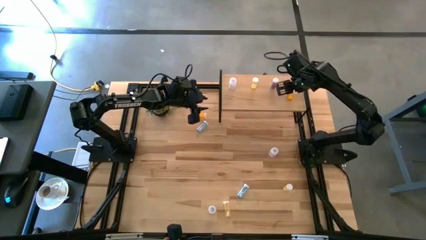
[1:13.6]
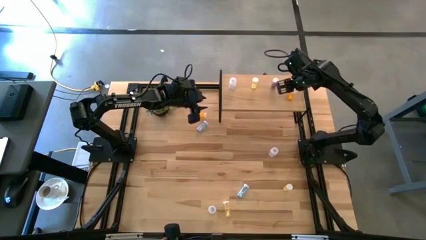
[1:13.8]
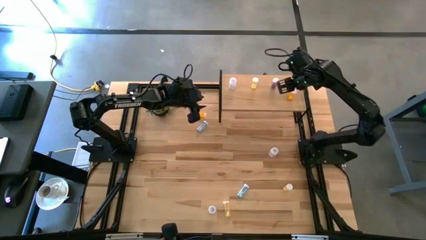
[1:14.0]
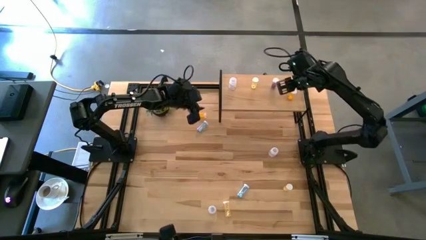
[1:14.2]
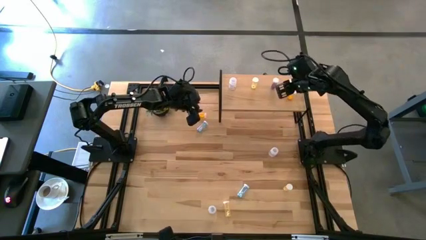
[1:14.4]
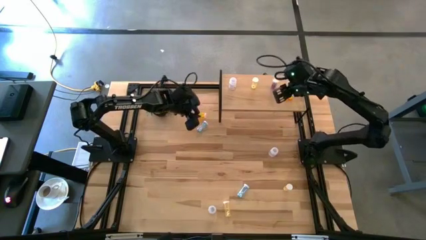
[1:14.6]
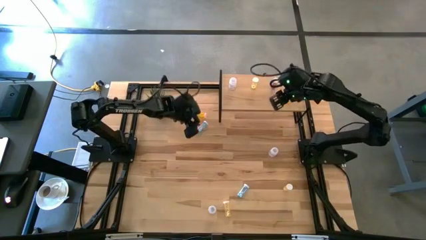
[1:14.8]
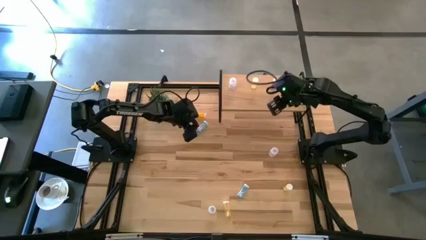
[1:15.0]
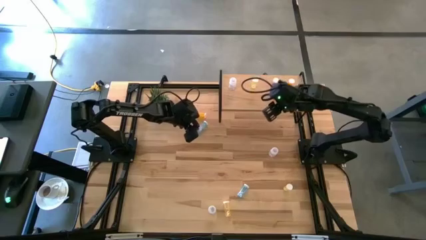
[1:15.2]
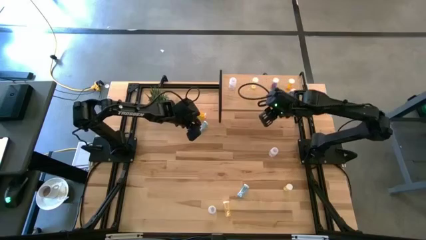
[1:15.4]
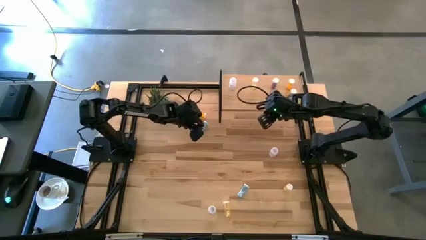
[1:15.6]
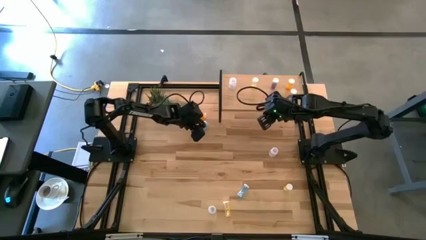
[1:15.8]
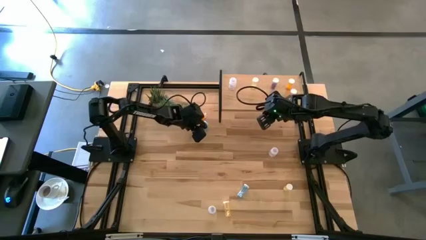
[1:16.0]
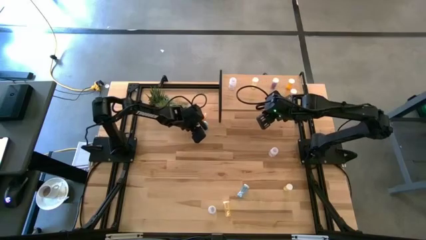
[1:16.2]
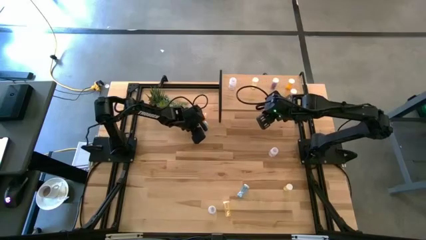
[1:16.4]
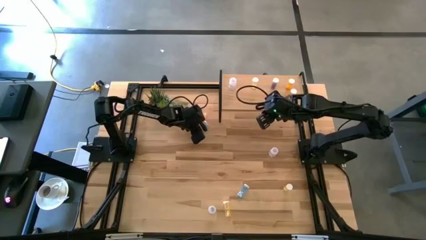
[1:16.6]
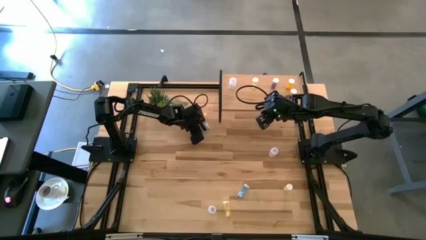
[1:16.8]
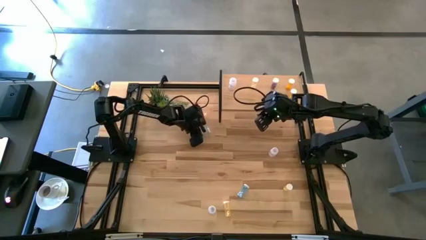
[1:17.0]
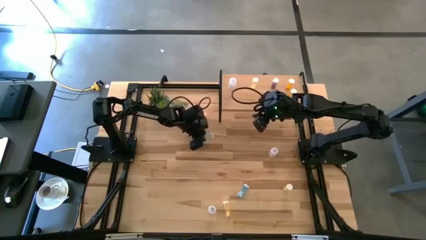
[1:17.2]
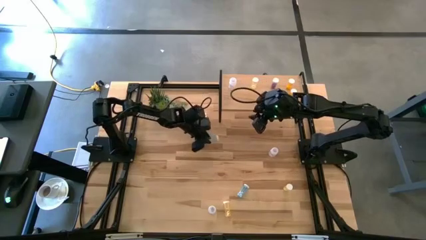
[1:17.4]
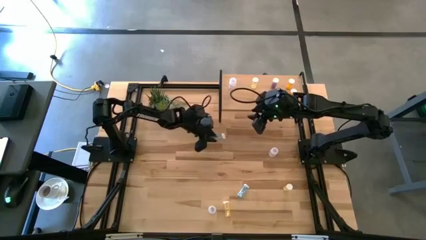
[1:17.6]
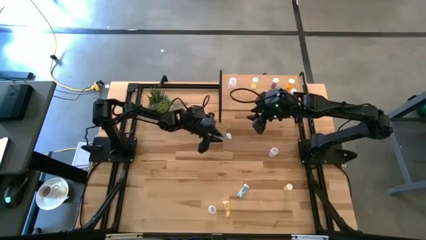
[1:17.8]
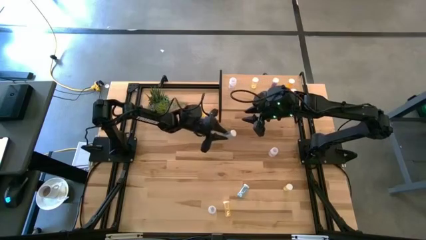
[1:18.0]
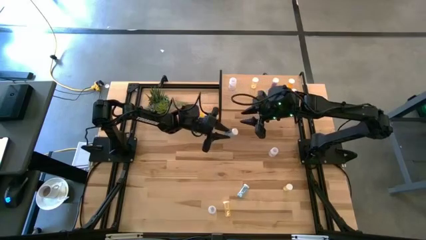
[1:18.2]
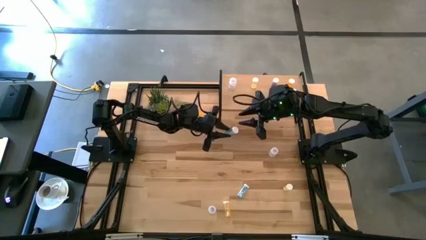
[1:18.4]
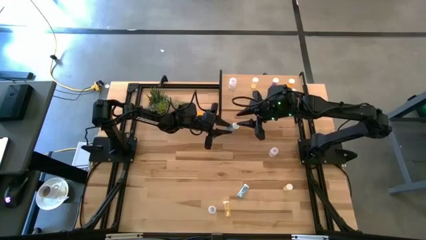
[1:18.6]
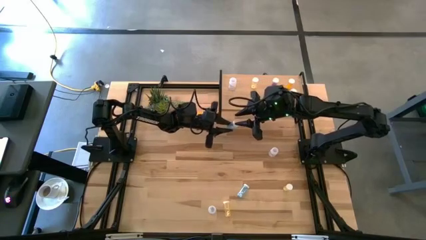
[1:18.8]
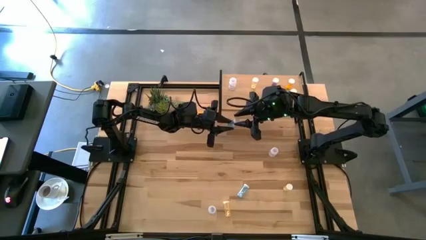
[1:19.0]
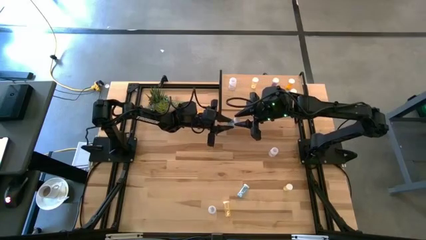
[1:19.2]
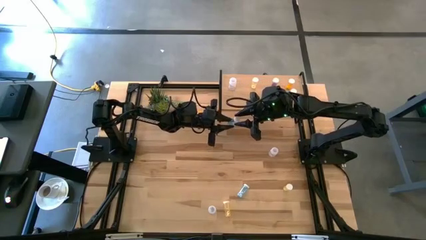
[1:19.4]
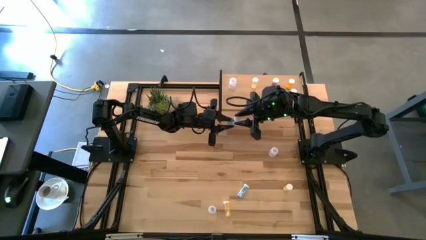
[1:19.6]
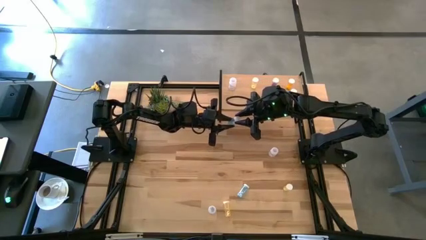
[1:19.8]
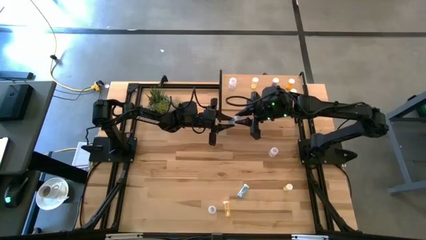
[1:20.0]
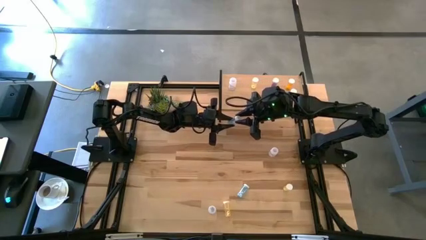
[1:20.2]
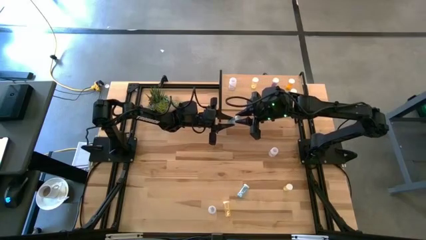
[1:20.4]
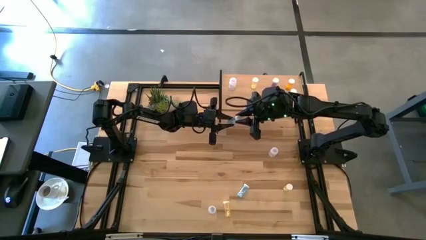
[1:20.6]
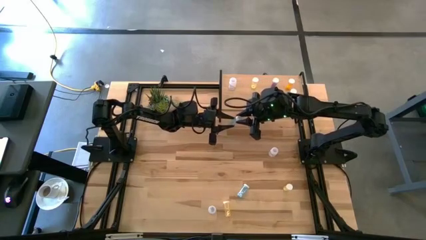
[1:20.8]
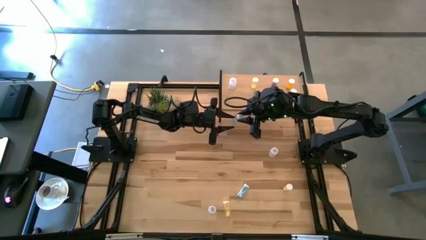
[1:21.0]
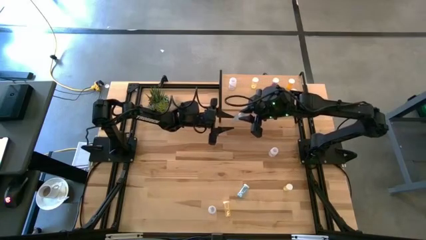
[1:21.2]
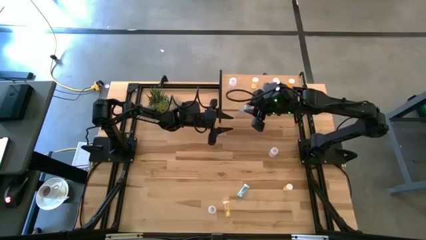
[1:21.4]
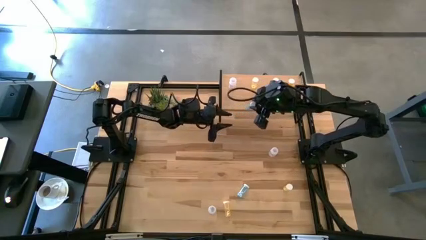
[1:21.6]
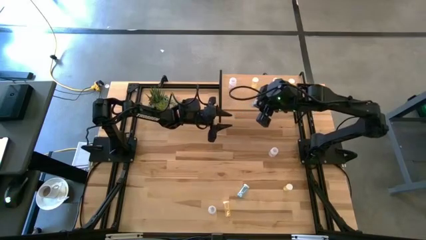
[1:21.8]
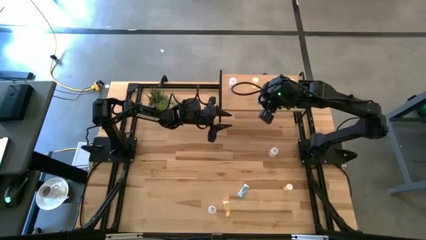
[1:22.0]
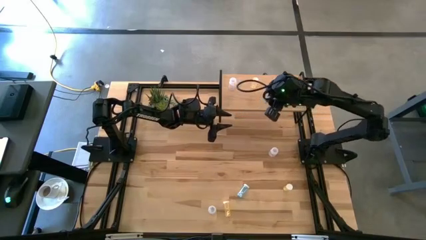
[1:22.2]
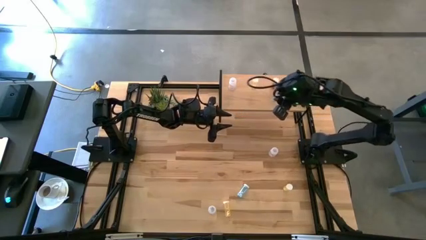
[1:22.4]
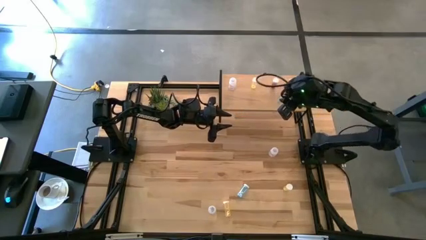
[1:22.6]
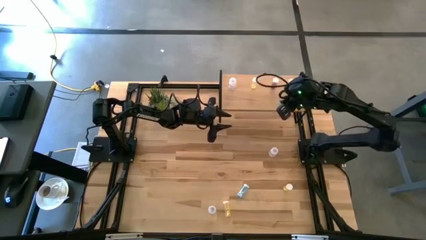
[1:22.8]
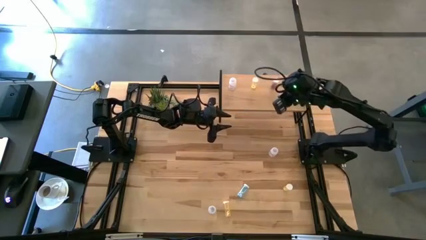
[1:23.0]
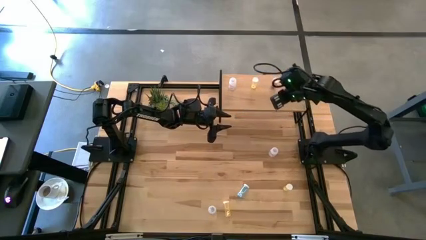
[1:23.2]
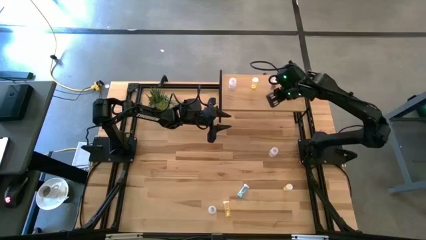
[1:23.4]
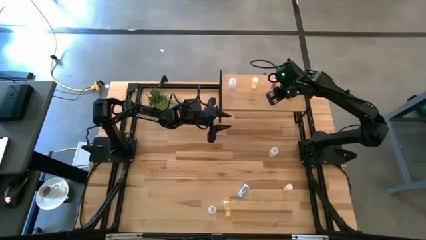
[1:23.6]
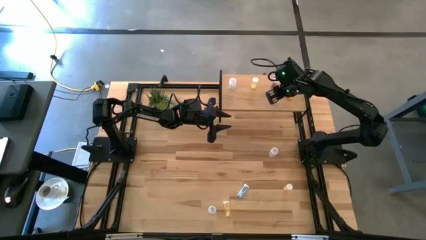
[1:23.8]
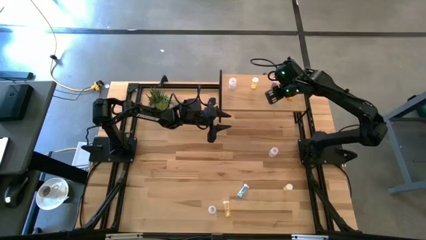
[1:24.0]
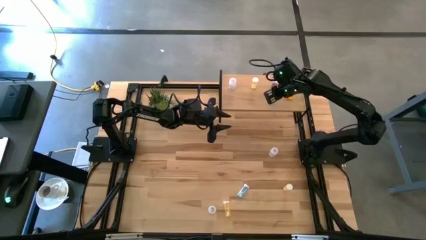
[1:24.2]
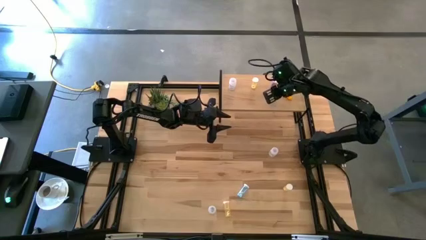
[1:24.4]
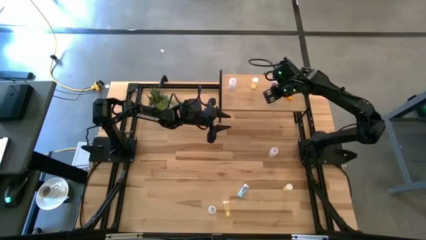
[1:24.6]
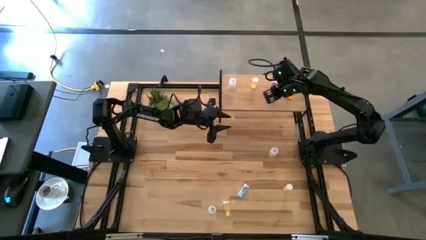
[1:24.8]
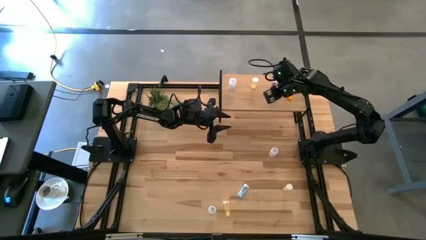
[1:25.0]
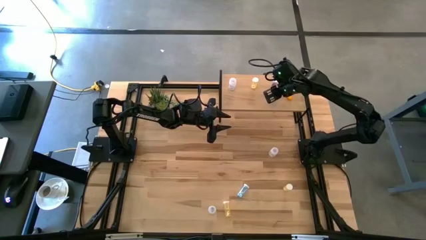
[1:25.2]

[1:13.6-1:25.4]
Task: Pick and place medicine bottles onto shelf by color
Put the top blue pill bottle aligned with the other blue pill bottle on the shelf

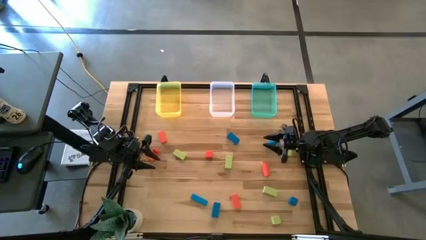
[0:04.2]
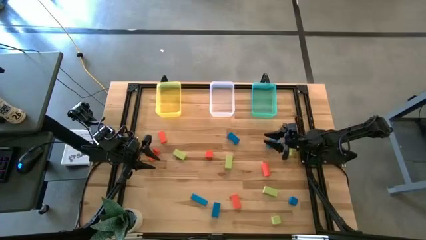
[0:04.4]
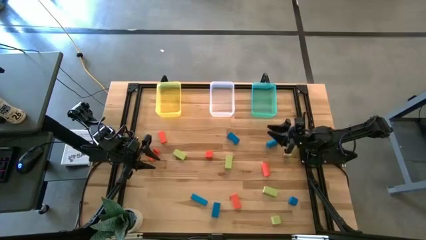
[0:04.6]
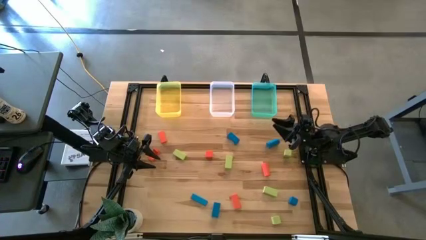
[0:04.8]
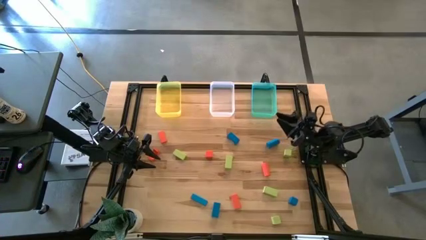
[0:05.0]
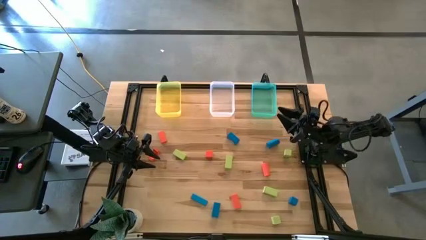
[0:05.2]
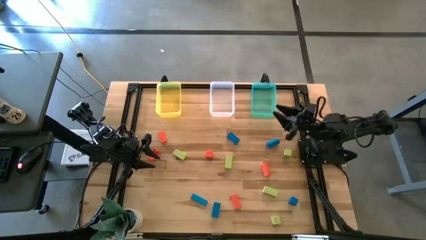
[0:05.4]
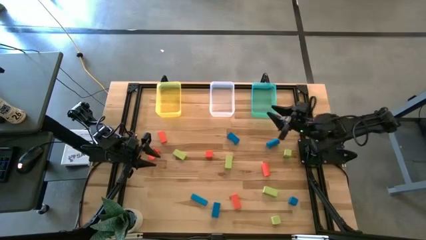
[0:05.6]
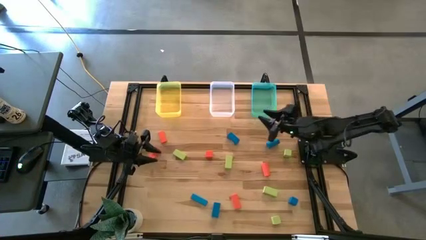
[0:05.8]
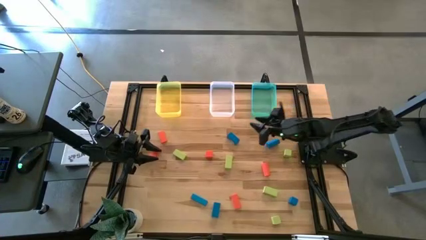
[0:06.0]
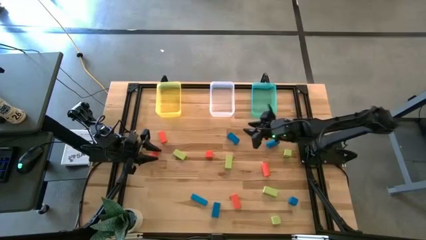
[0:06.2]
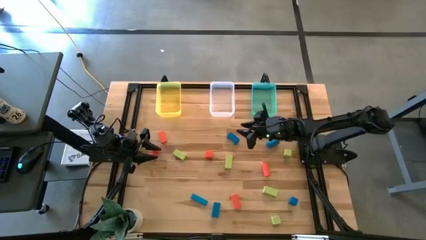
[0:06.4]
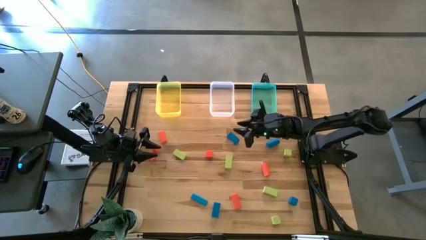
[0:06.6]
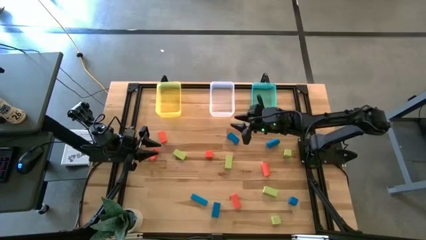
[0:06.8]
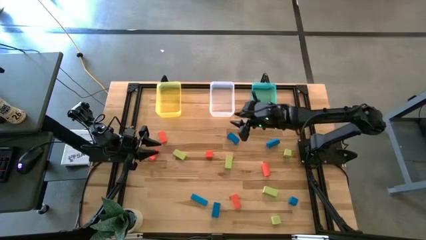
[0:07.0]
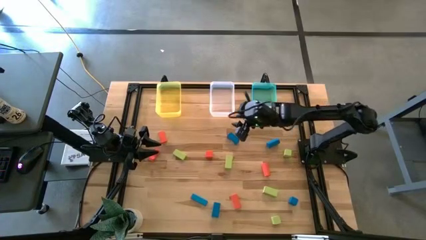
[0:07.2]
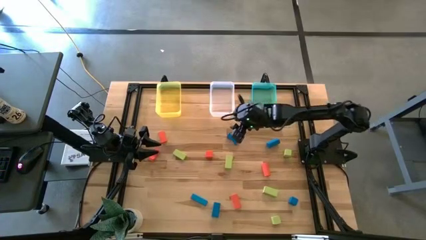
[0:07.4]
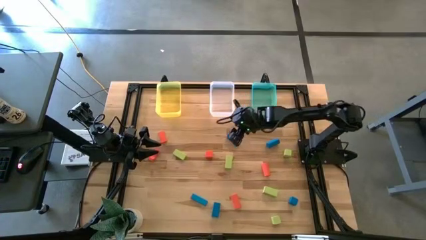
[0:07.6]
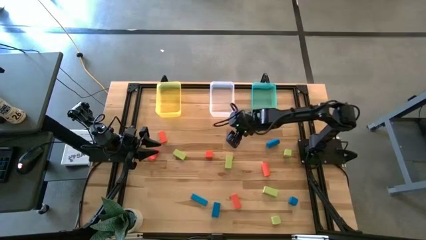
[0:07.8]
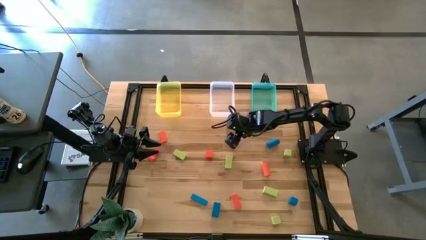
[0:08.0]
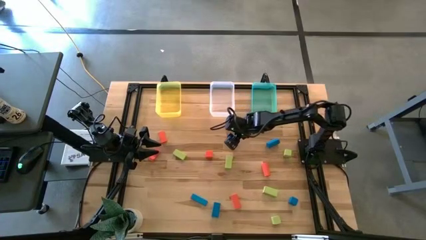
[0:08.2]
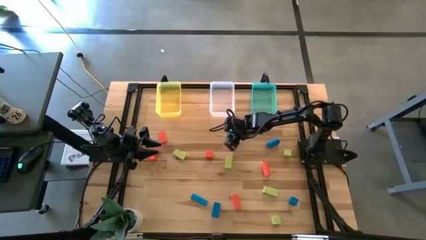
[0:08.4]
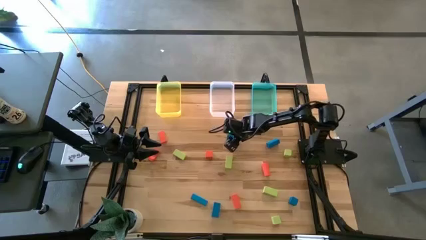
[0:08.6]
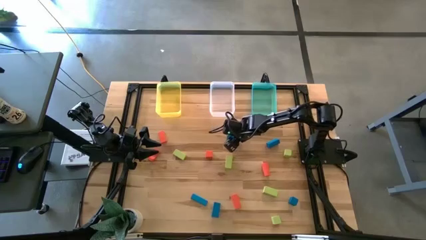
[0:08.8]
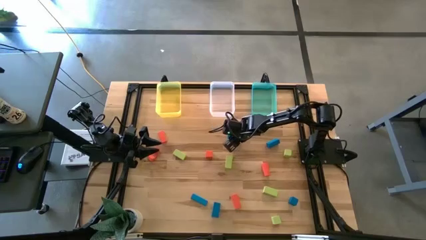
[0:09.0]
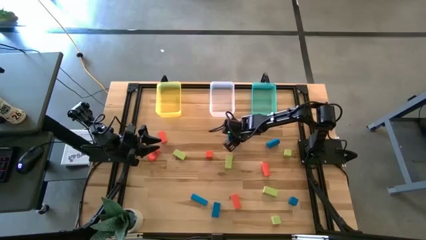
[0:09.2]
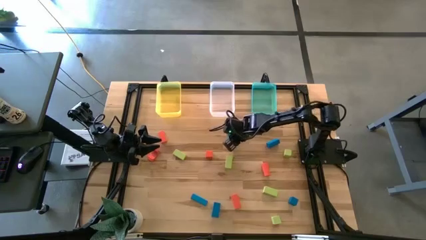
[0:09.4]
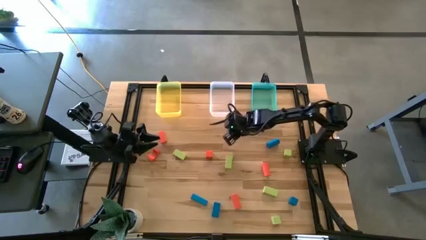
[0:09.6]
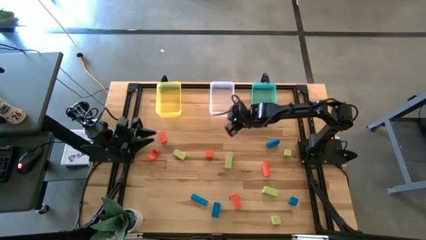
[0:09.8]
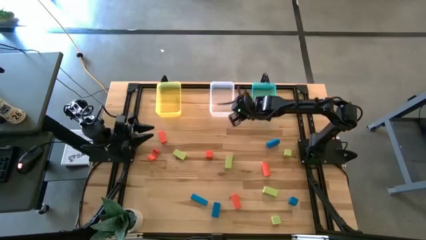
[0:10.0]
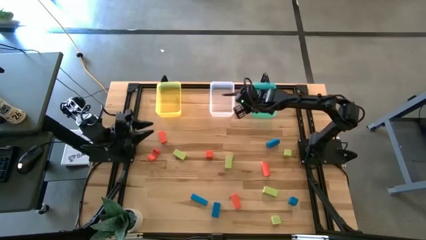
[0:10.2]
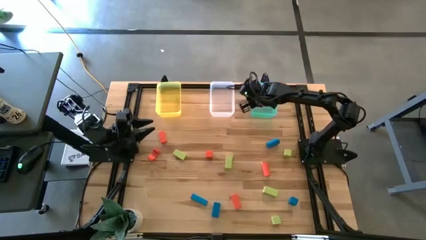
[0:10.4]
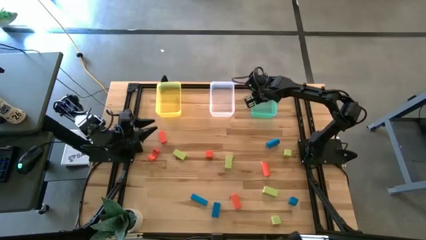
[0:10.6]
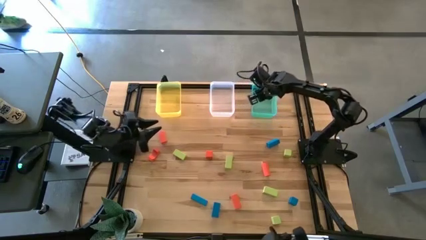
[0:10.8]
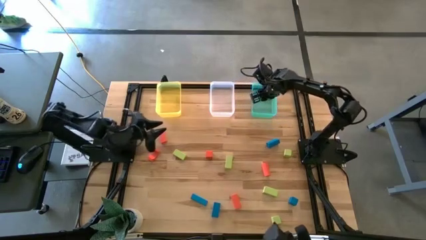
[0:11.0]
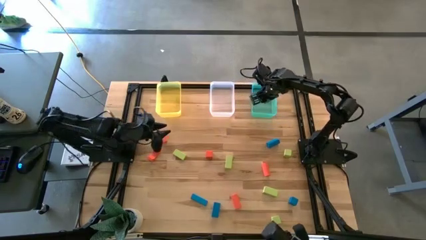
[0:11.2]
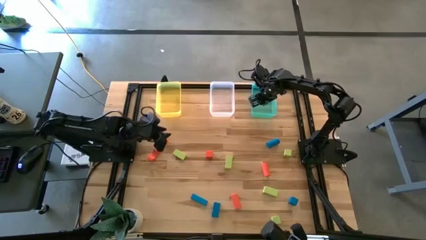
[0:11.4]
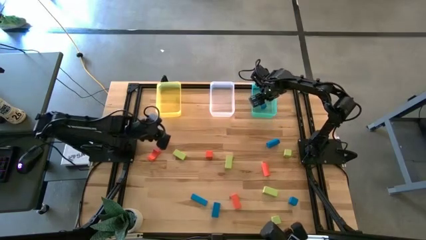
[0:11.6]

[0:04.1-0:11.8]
Task: Sort & place blocks by color
Put the blue block into the green bin
